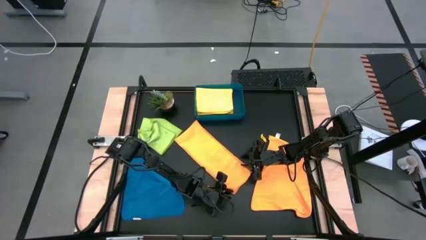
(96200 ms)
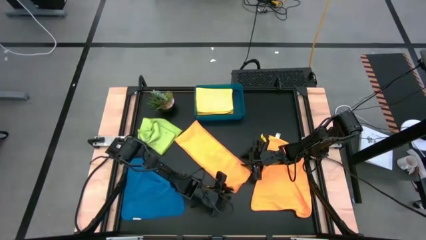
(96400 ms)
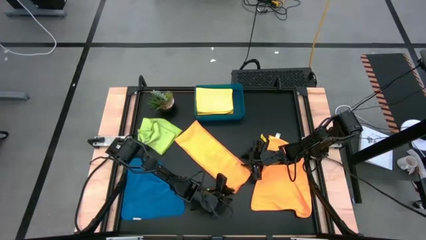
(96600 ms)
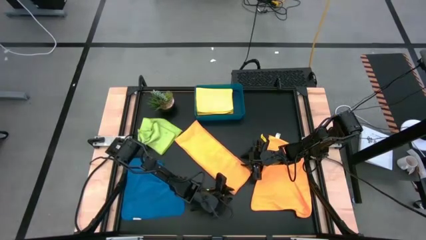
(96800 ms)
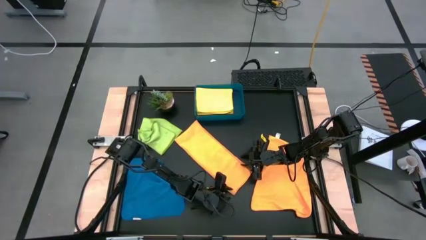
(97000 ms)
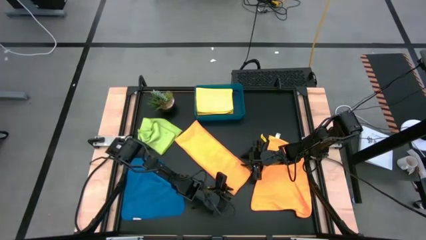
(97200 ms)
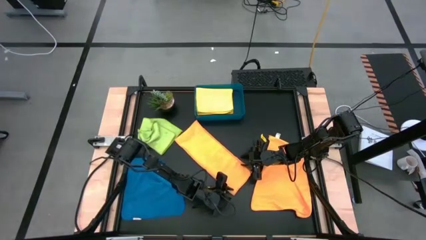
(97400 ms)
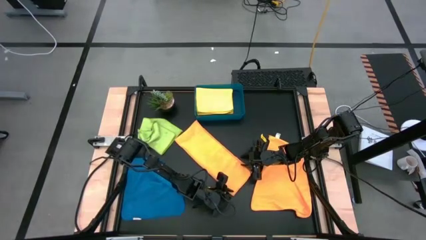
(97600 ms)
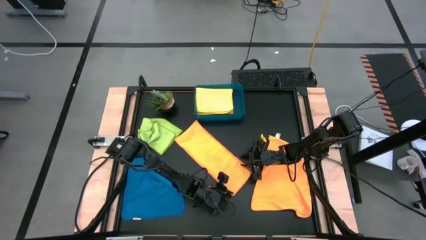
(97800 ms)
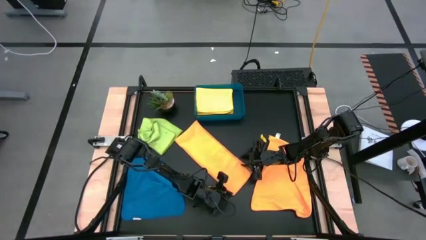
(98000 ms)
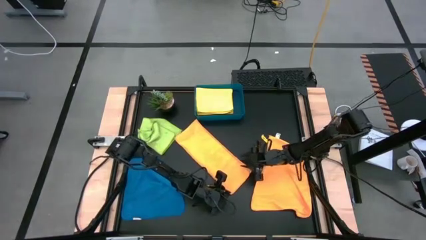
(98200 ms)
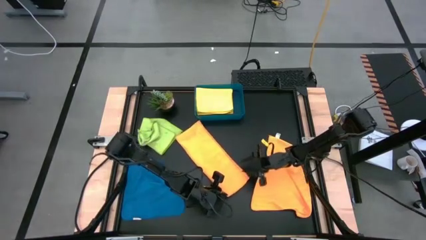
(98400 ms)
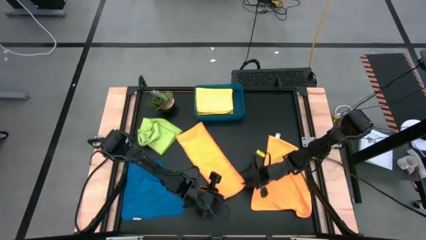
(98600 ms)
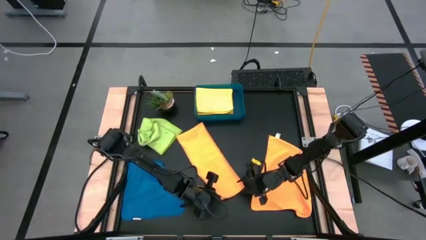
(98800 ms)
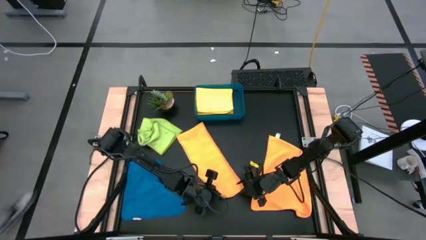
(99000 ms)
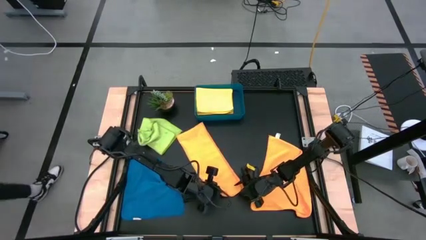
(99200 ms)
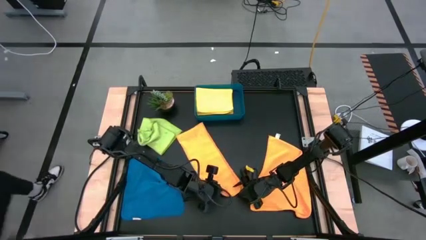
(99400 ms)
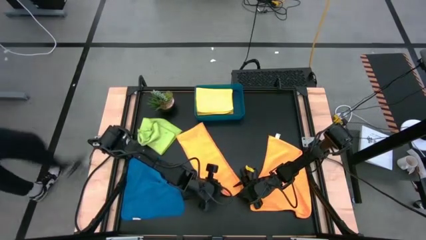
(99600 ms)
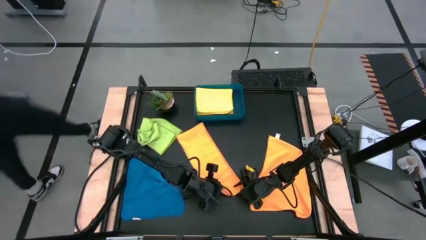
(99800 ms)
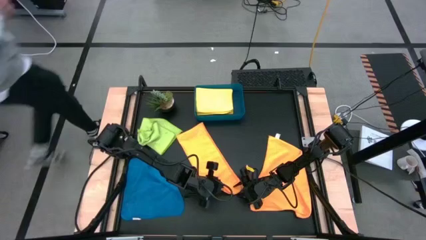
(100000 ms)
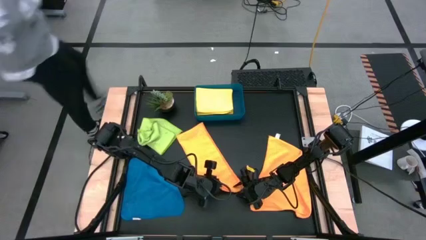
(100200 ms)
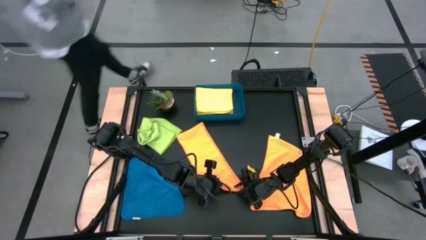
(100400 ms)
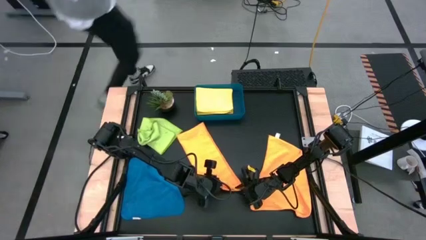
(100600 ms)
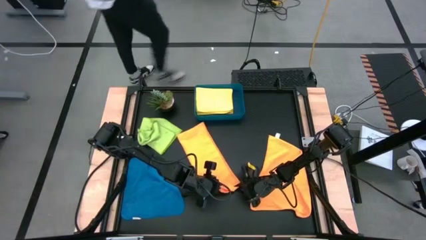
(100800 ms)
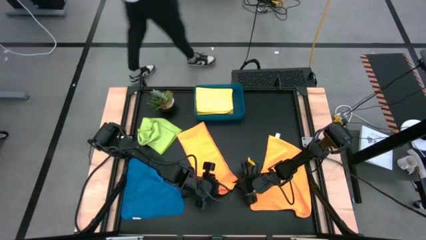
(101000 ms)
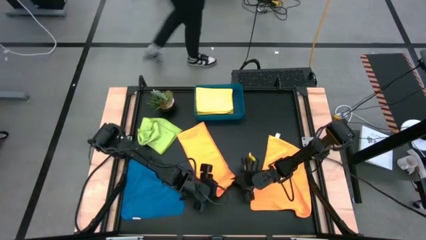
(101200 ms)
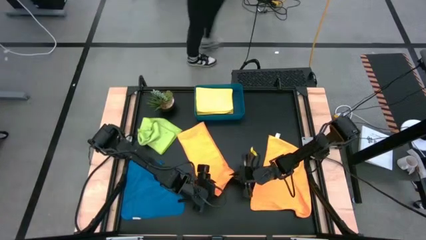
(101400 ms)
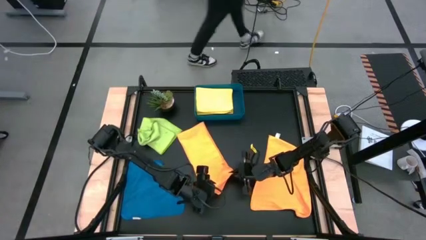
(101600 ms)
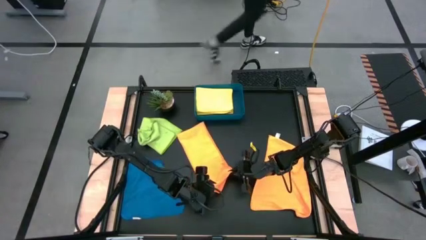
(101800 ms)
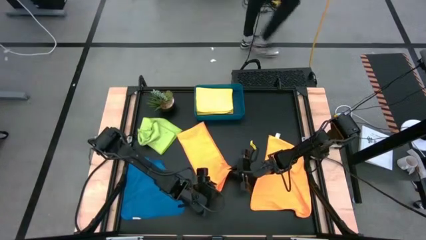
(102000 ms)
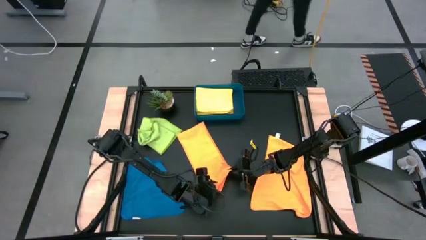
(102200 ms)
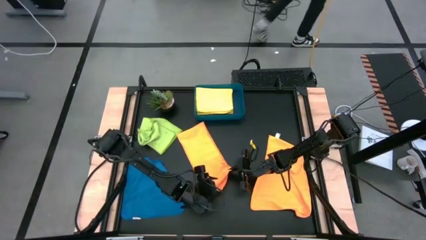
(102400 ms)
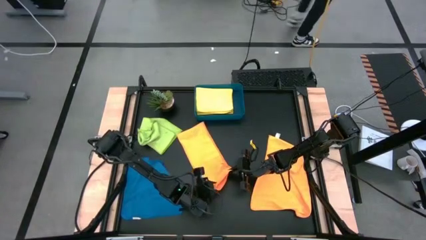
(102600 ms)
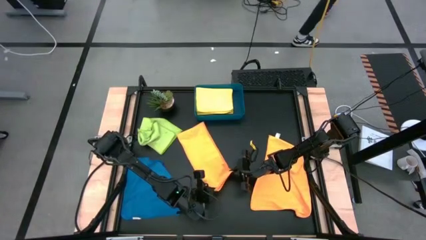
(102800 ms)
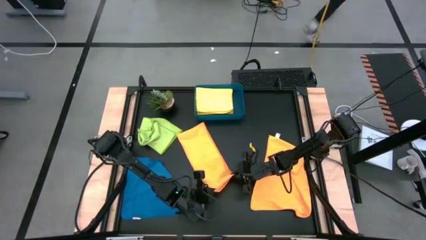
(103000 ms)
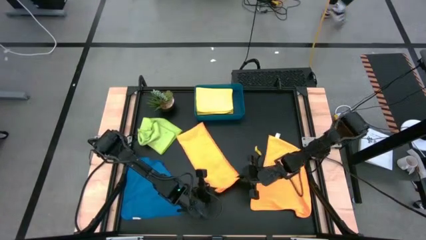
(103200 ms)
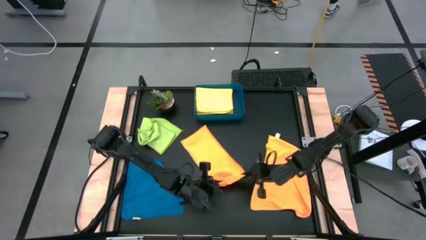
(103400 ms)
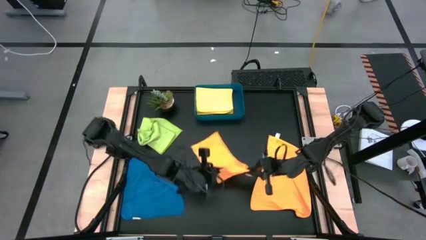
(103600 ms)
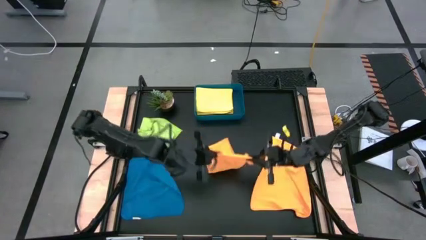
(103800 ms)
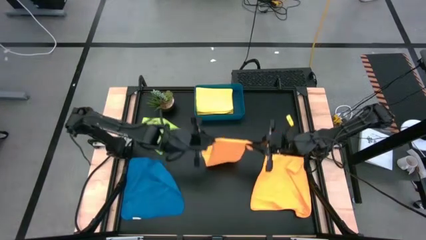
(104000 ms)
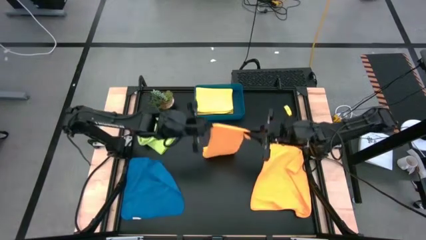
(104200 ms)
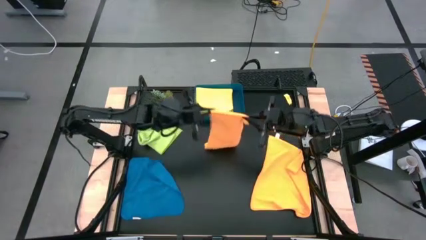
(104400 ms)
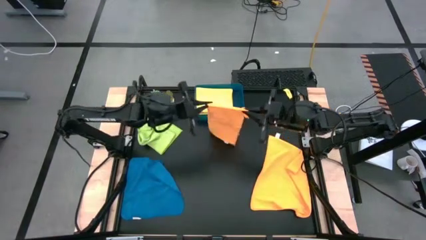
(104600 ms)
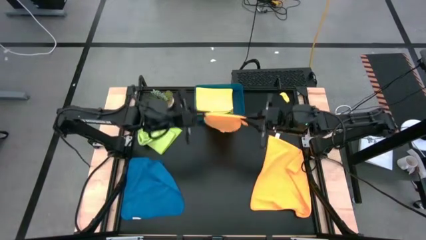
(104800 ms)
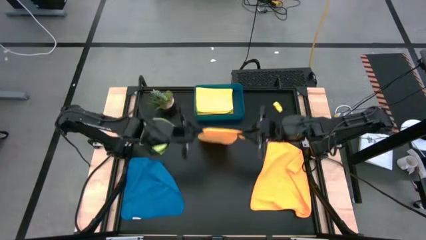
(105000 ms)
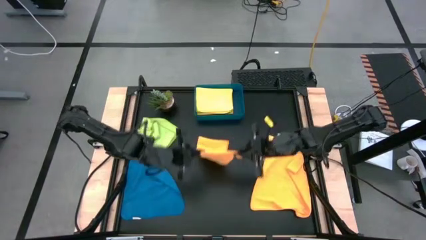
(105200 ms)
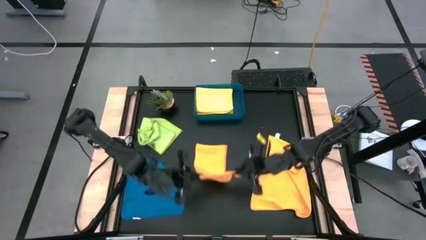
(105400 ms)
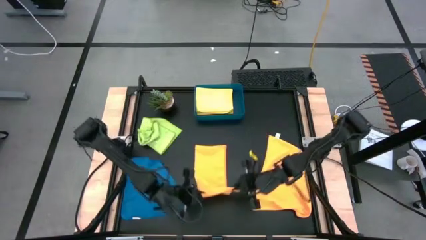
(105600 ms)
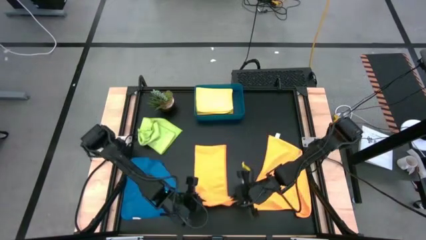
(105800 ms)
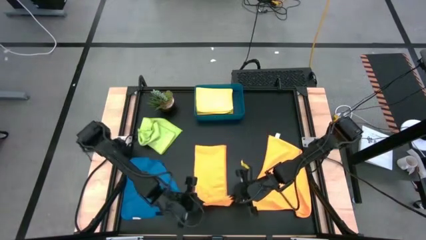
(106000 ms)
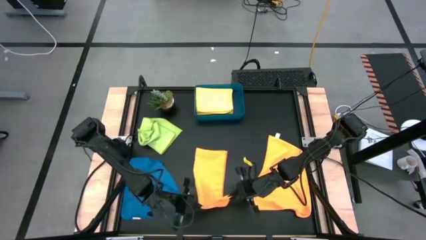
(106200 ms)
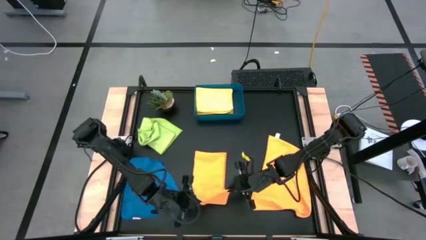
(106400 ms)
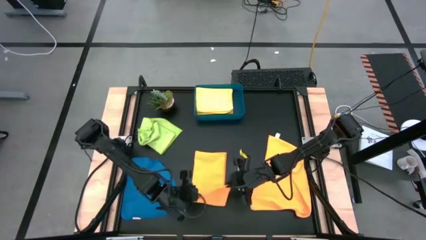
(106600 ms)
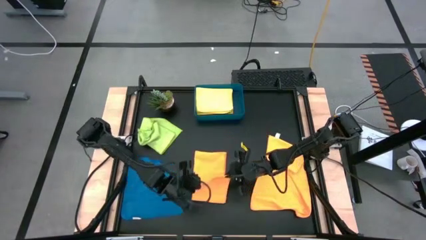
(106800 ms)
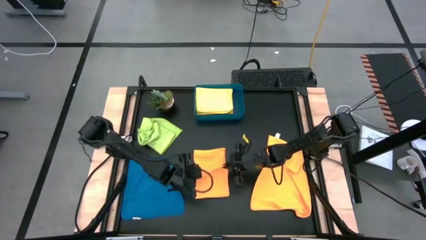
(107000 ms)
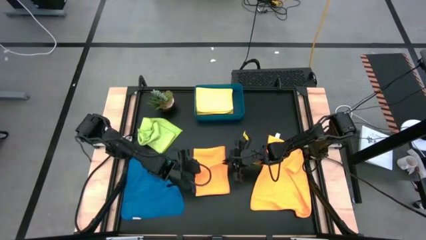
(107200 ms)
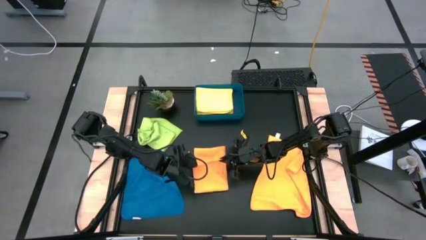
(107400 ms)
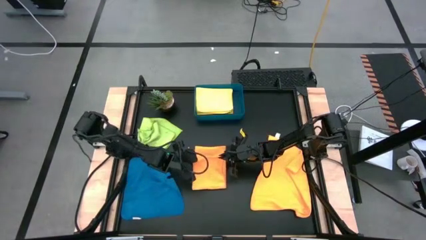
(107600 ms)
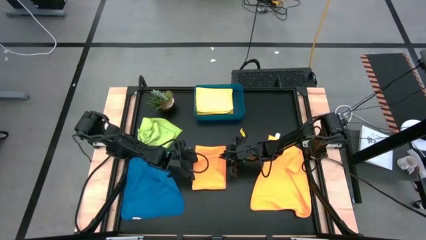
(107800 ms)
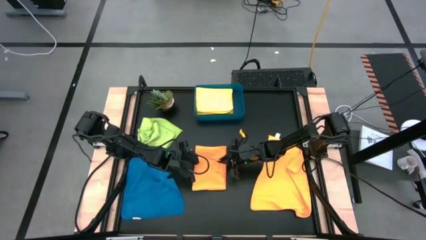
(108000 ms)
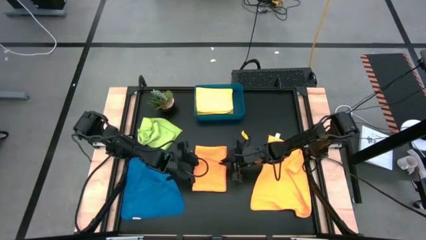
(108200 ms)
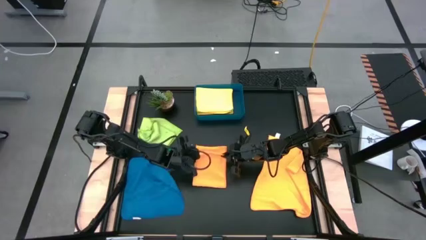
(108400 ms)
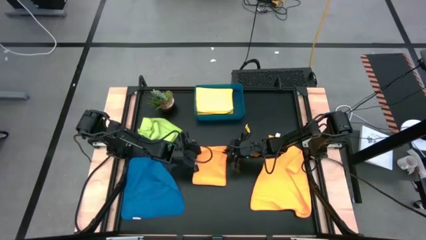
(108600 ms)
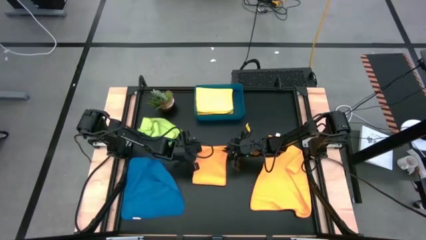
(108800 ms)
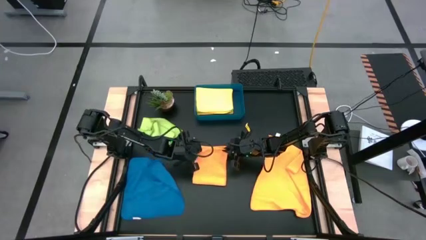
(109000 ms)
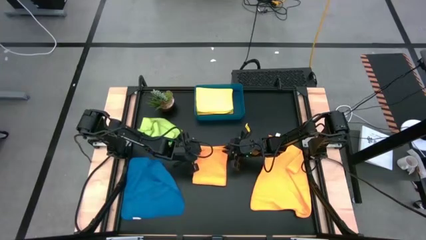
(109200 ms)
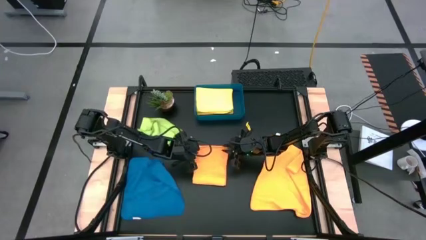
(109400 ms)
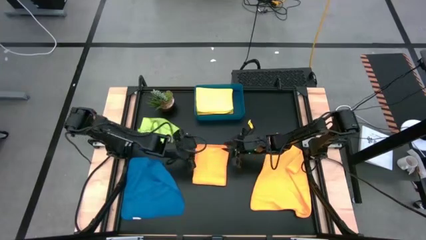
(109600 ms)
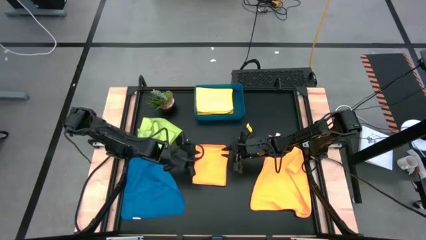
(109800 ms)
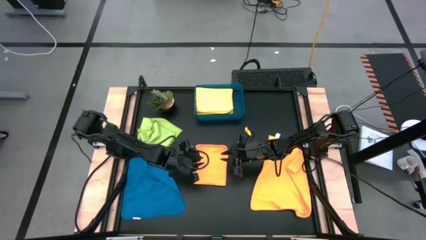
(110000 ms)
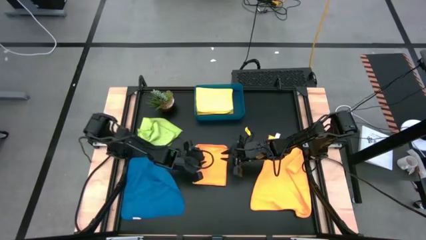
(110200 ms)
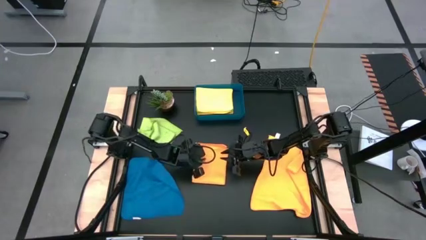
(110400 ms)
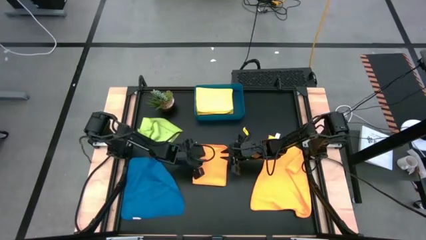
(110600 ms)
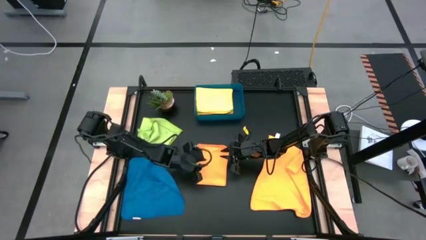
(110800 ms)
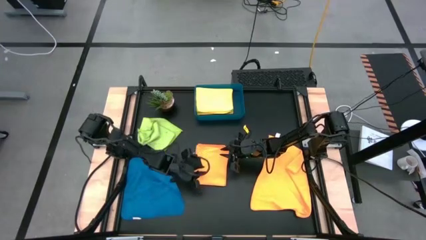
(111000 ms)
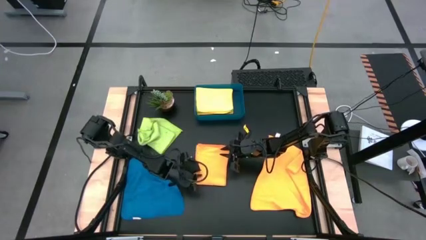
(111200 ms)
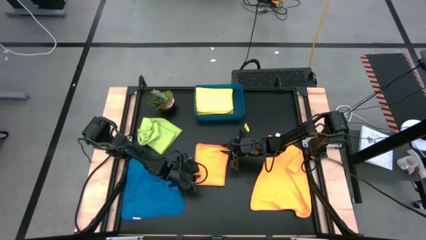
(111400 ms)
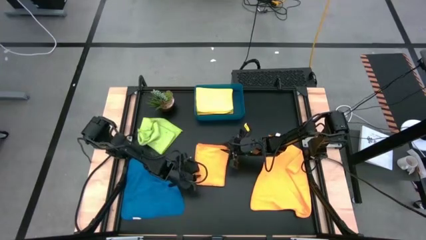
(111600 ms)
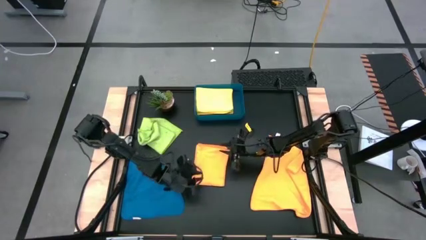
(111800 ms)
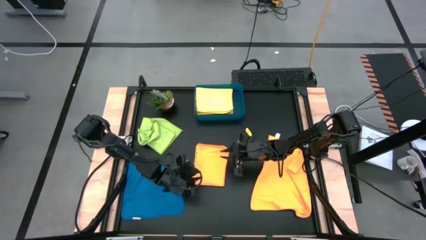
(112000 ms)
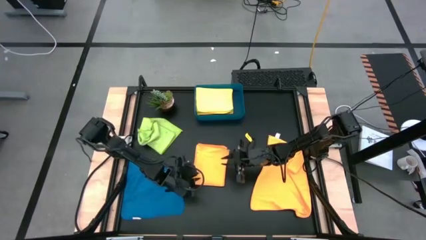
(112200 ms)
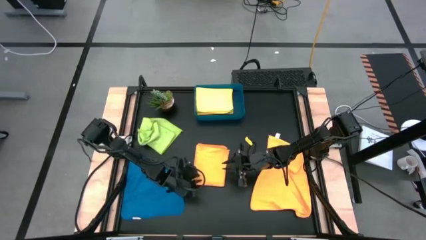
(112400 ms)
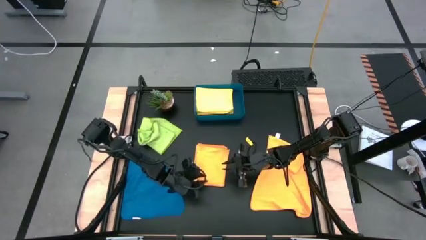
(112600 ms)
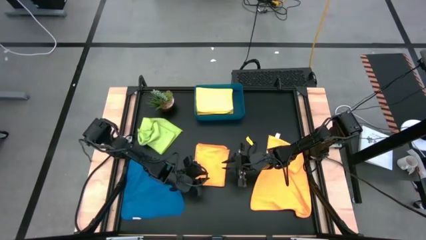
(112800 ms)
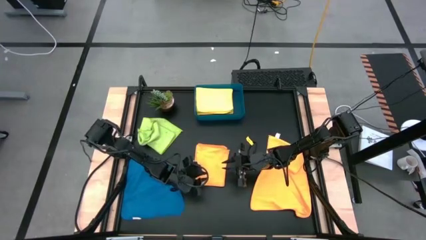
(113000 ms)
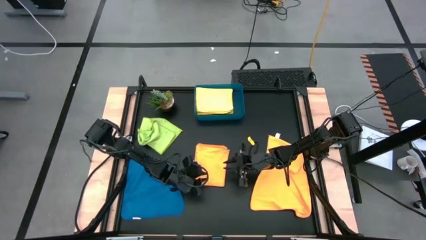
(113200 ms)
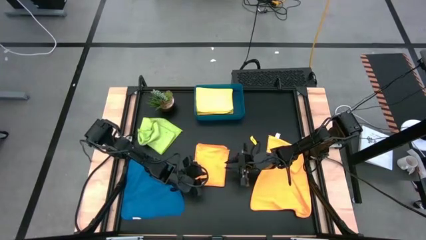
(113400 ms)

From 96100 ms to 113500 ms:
Task: Fold microfiber towels
Fold the top orange microfiber cloth
